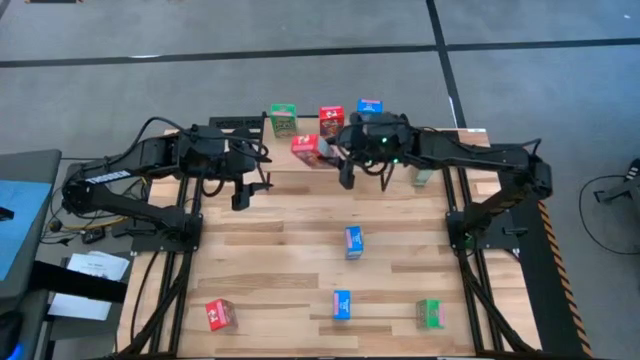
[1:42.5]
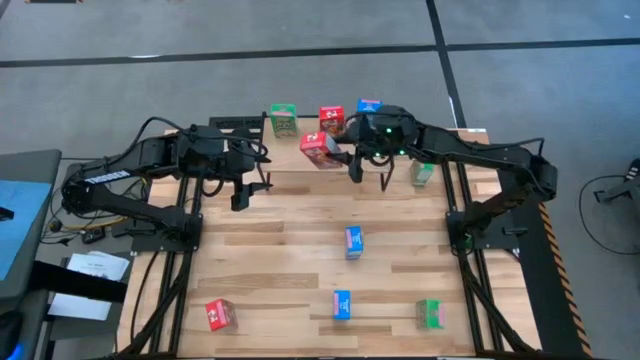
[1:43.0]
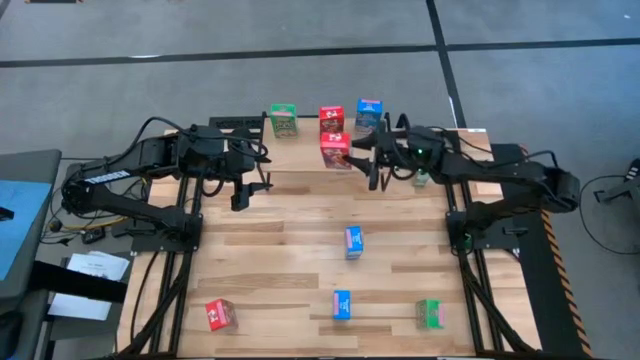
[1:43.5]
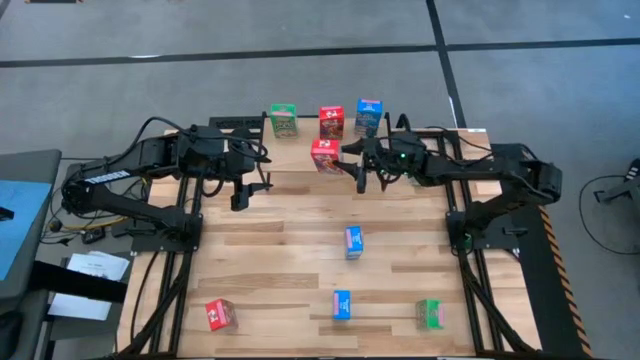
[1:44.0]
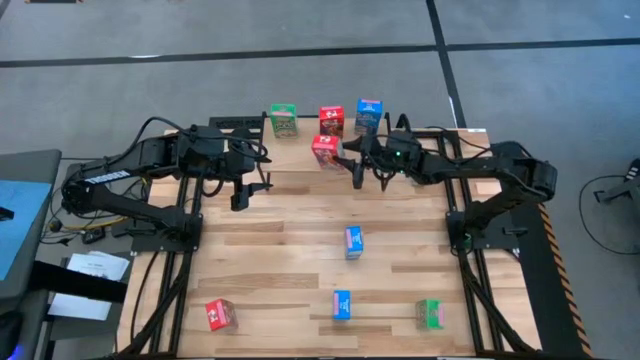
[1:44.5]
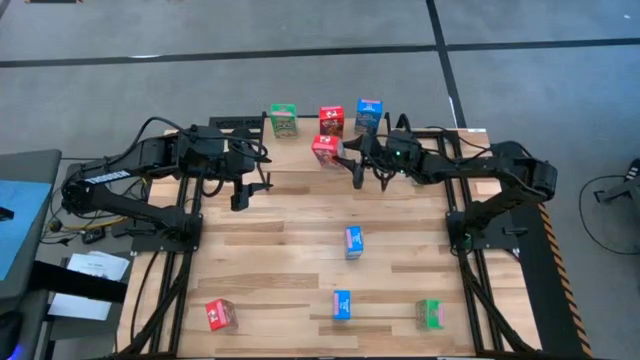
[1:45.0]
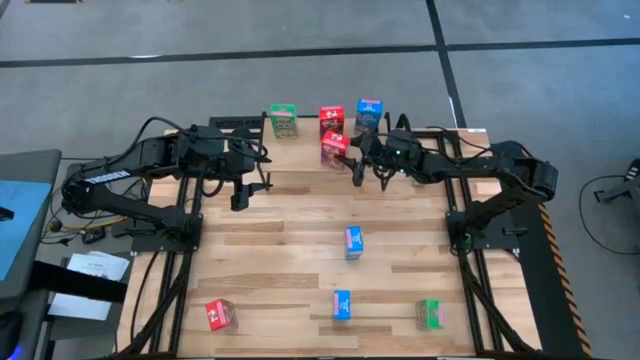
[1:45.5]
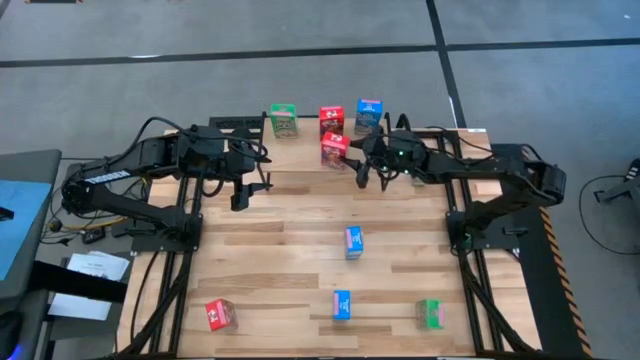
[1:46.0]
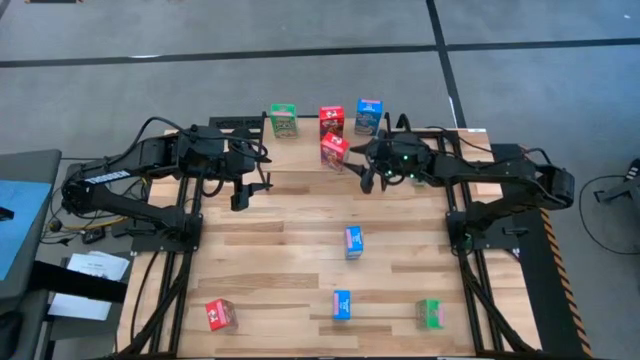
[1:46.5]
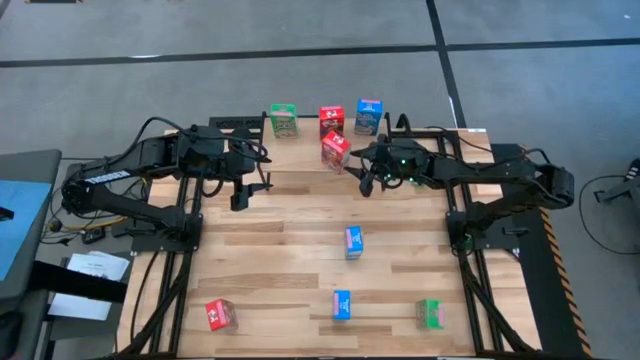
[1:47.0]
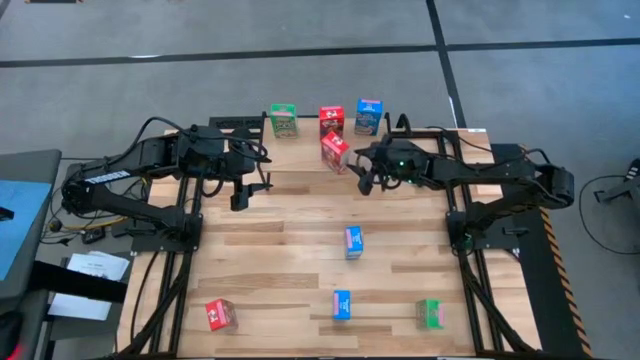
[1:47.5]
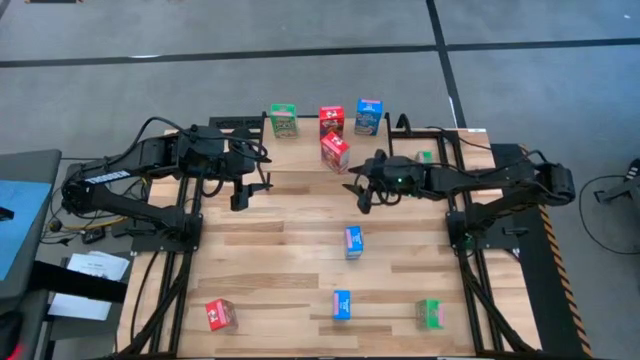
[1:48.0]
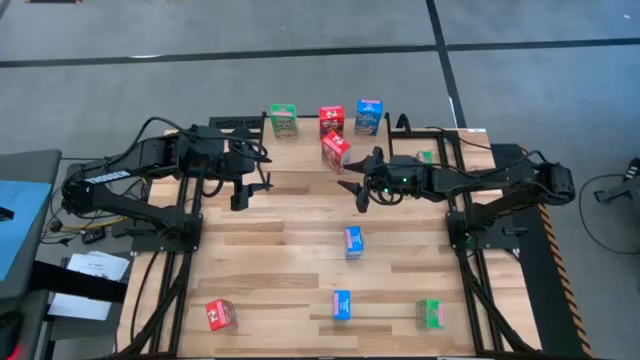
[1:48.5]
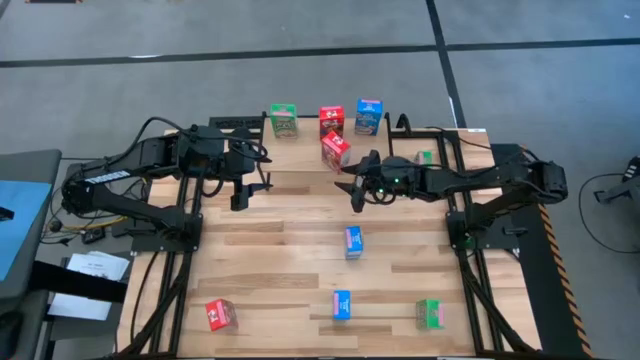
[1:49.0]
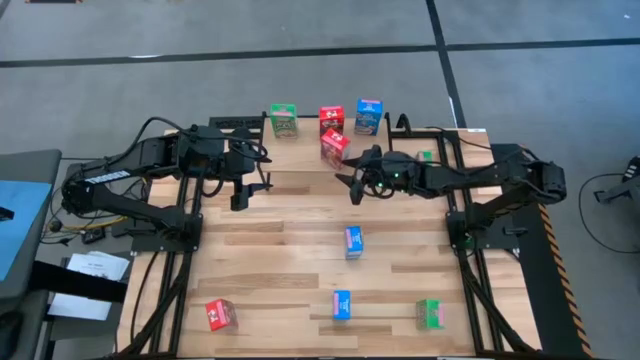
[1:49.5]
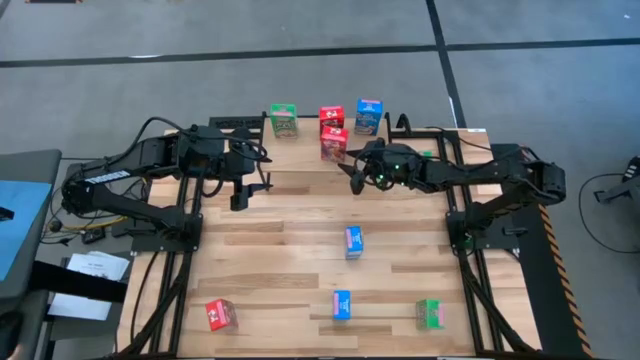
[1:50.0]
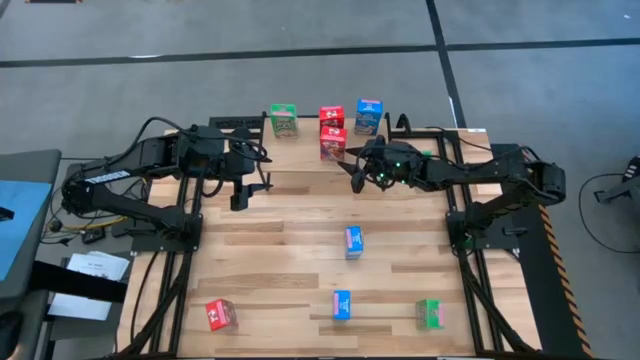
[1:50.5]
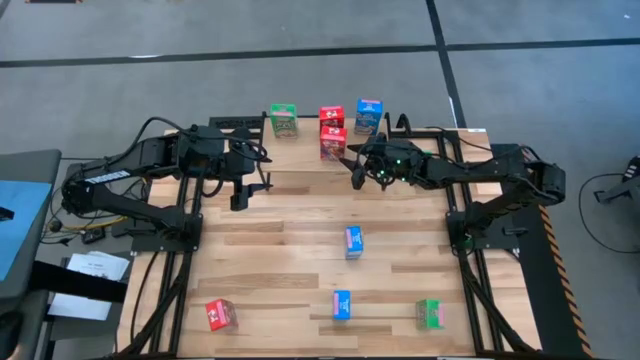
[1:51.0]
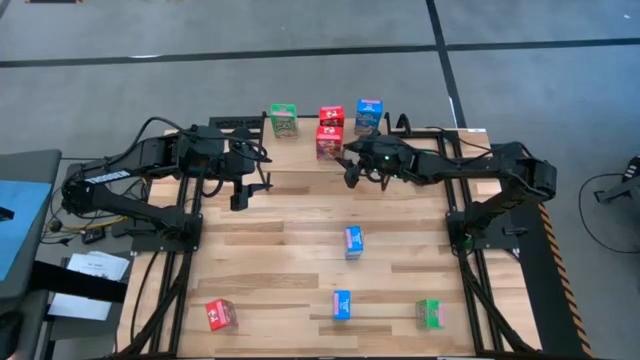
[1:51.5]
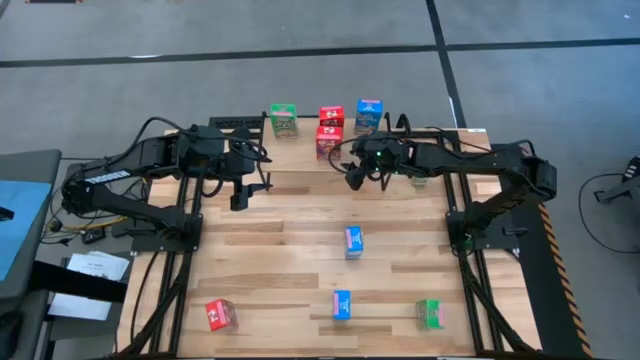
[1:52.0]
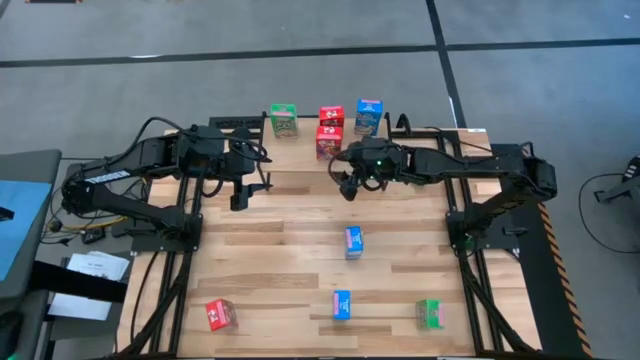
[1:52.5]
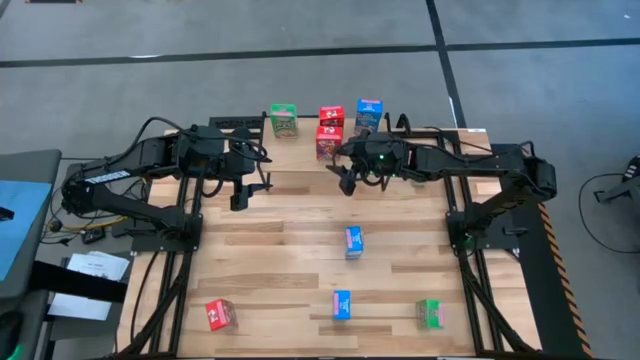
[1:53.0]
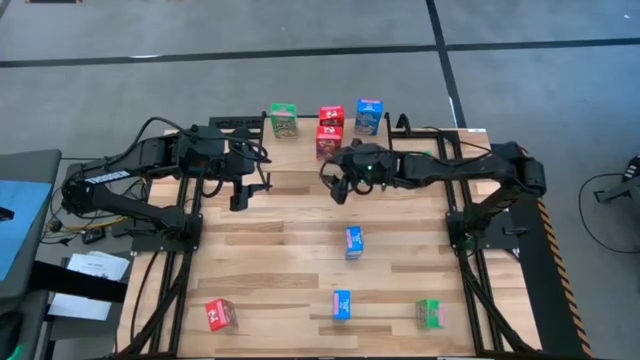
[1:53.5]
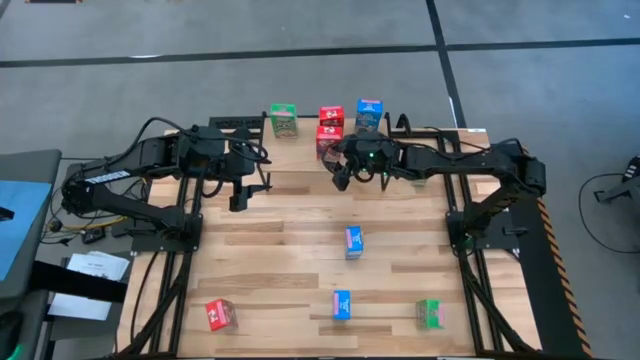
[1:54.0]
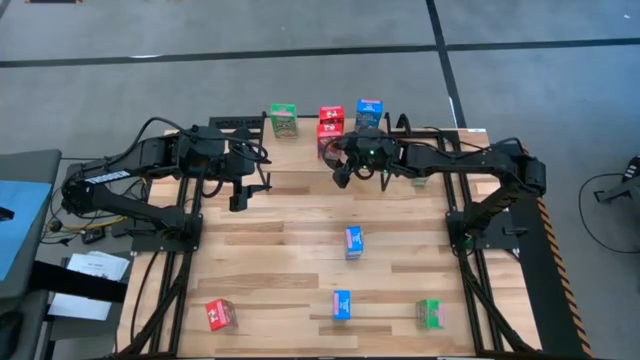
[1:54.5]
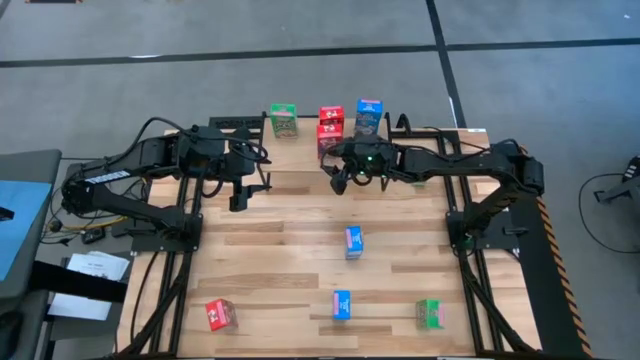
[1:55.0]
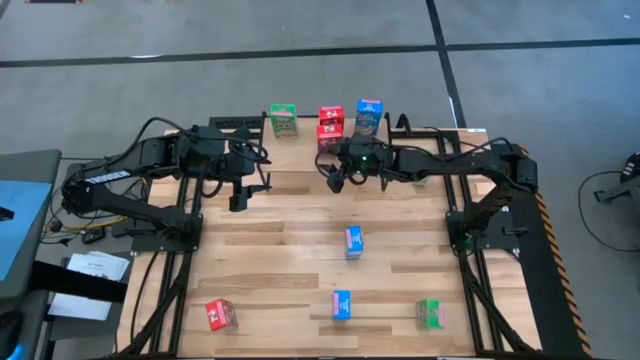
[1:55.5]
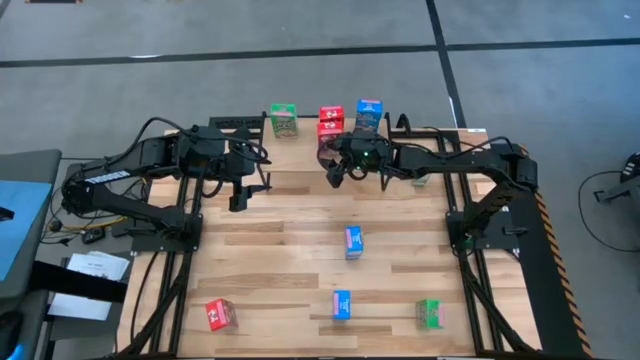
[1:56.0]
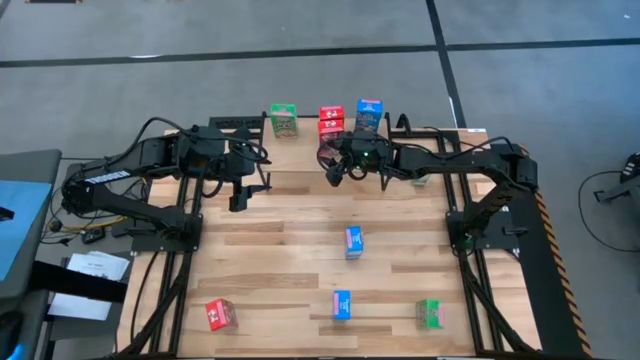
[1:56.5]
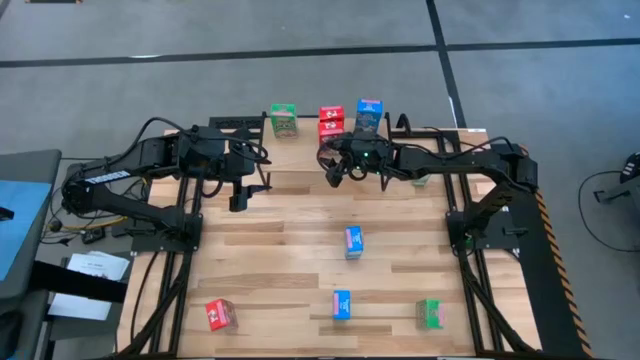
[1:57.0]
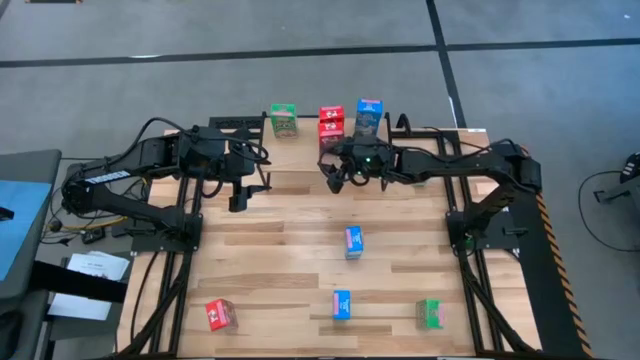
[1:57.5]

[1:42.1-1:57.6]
Task: Stack cereal on shelf
Put the top red cereal box on the shelf aligned with the other red cereal box
